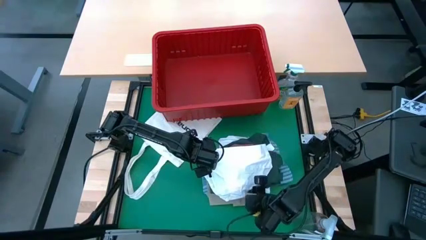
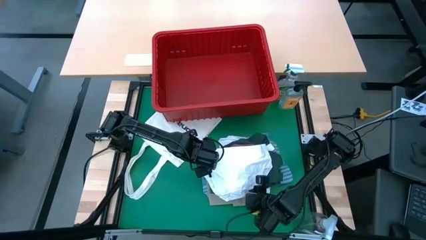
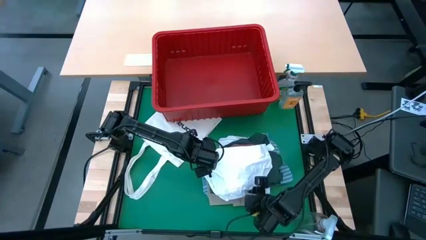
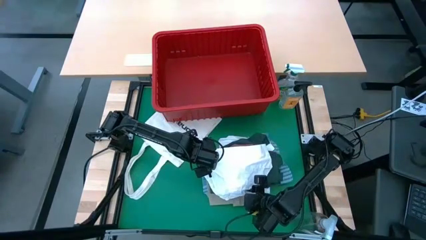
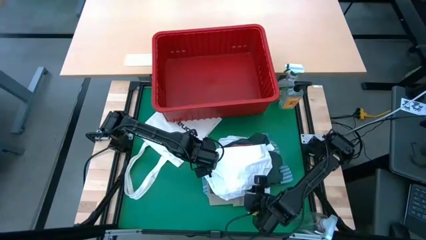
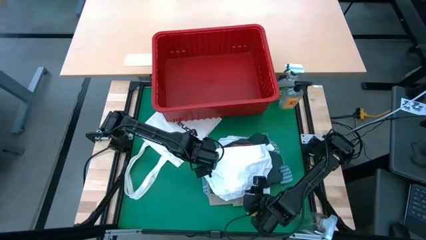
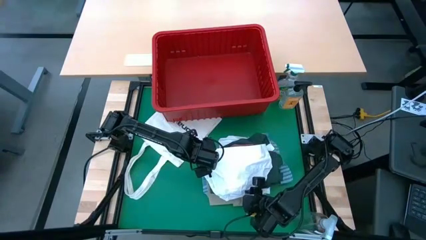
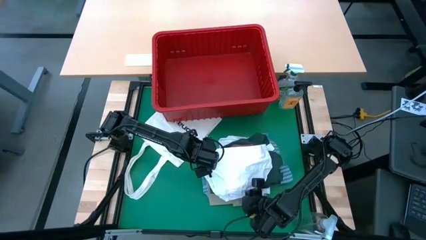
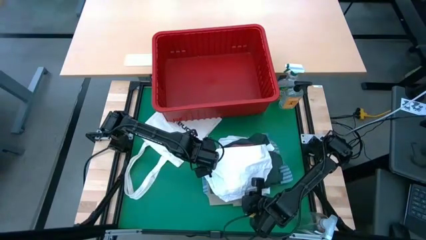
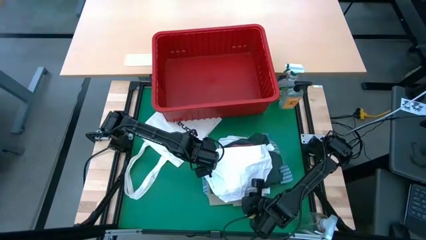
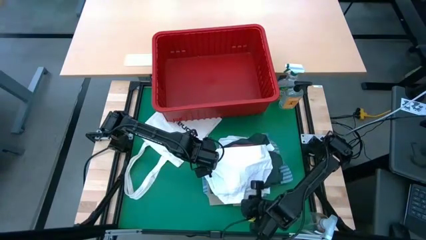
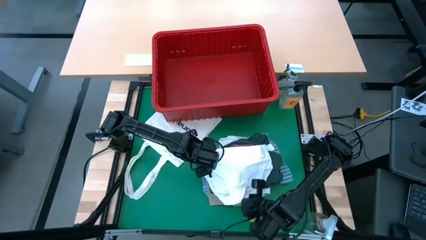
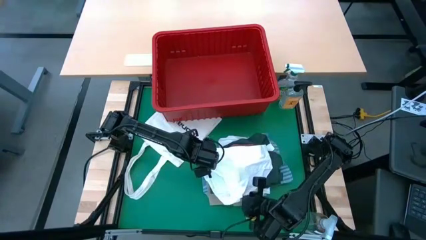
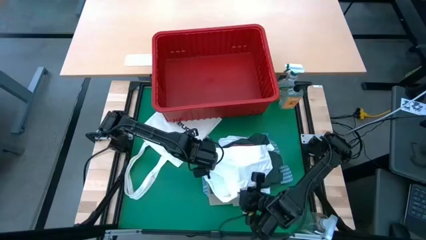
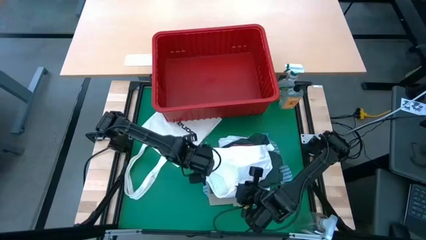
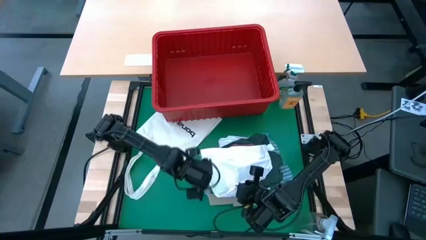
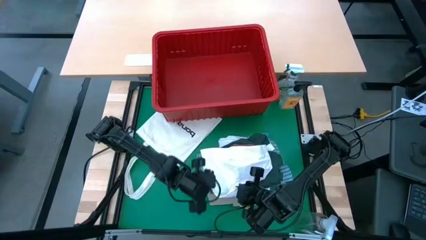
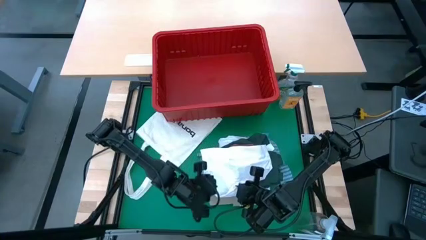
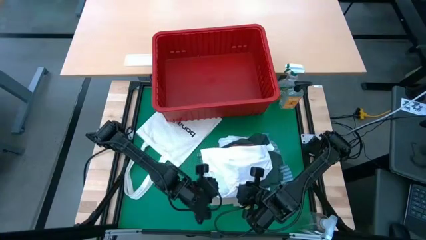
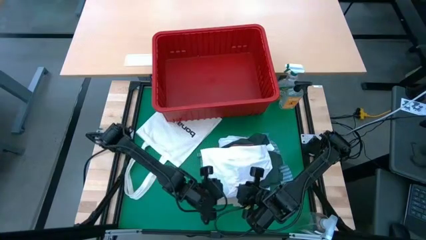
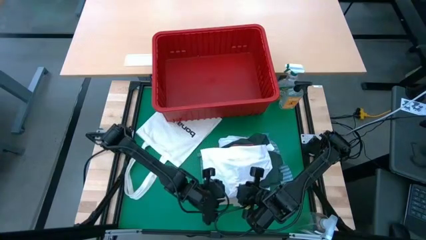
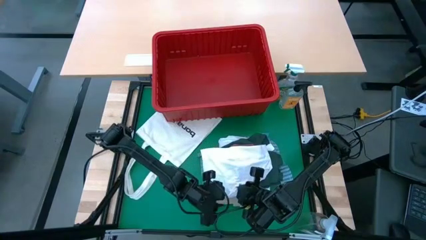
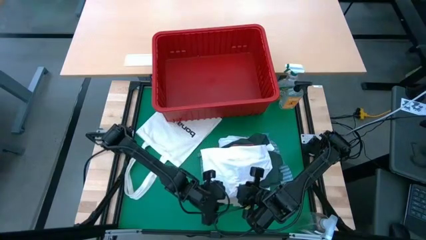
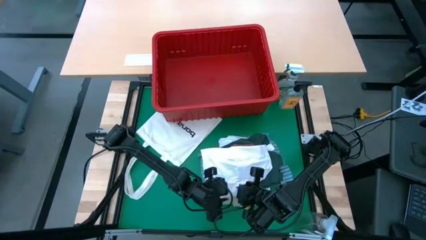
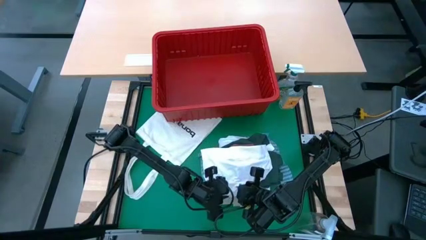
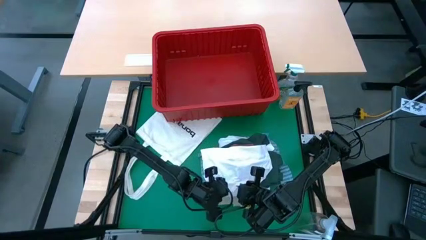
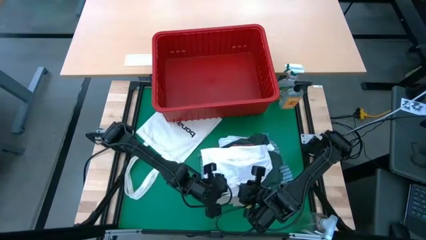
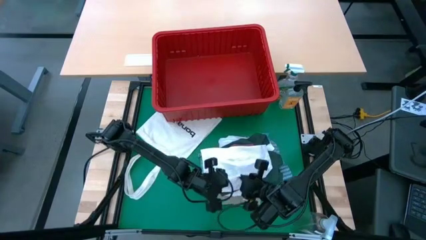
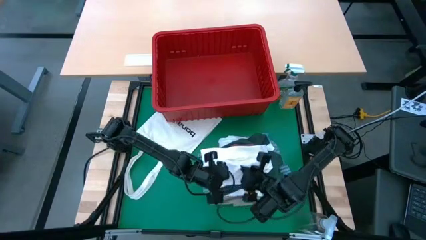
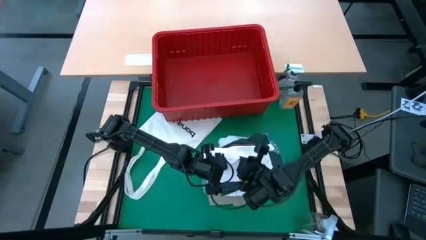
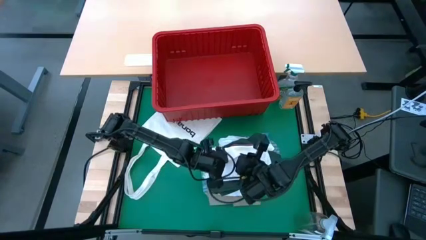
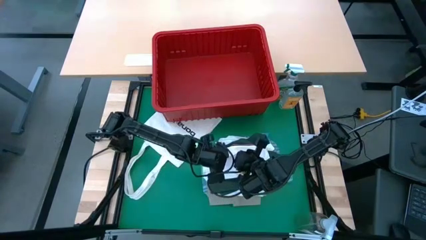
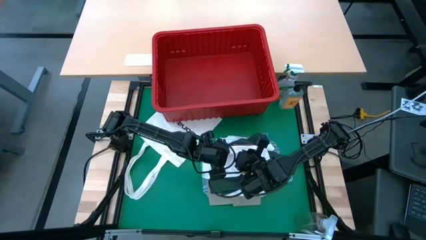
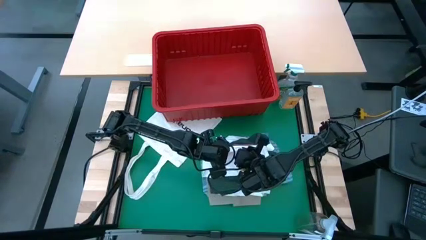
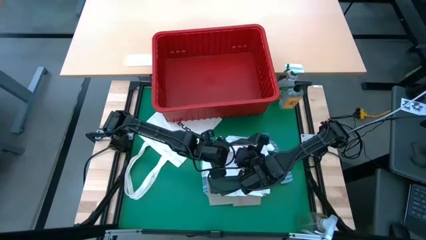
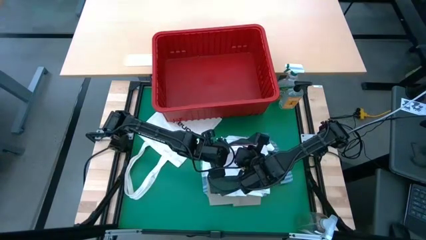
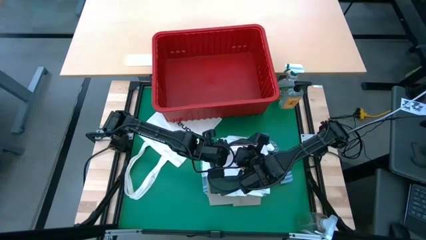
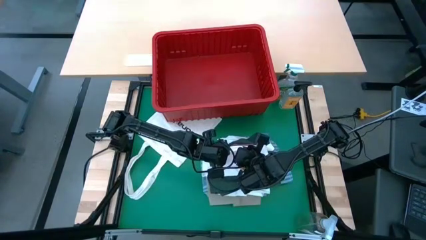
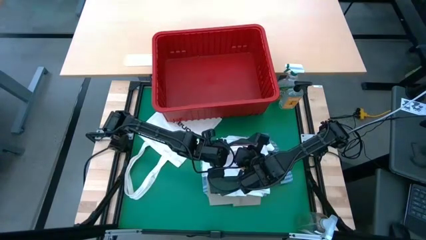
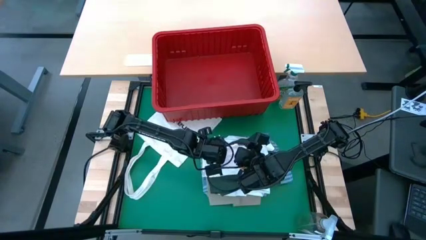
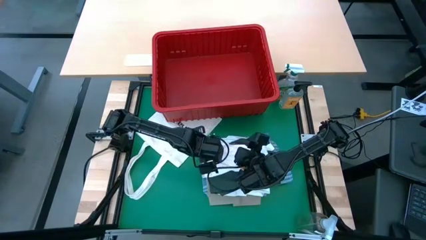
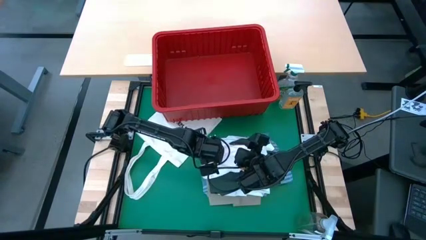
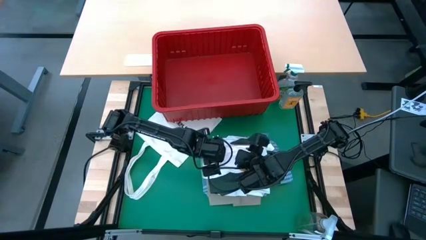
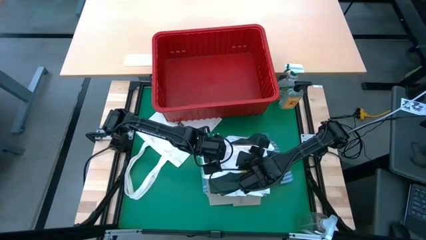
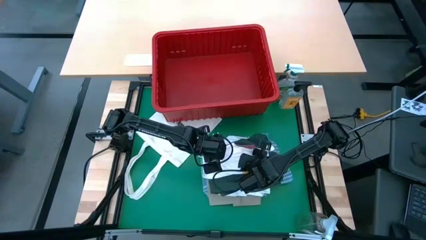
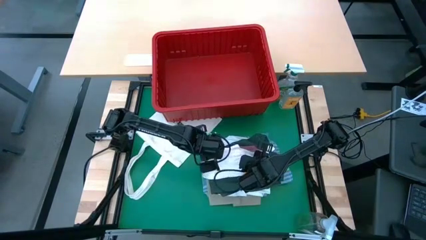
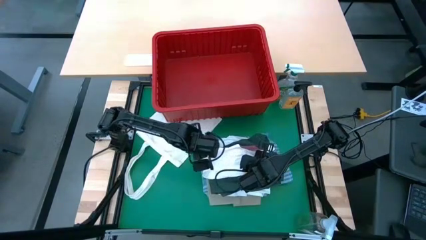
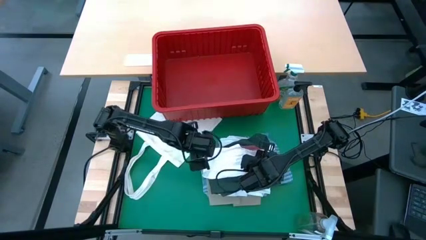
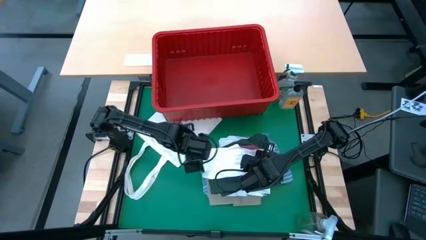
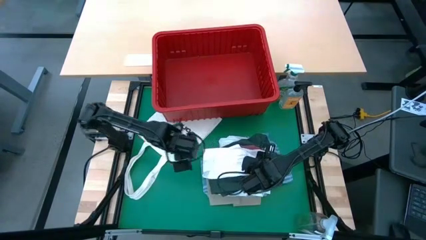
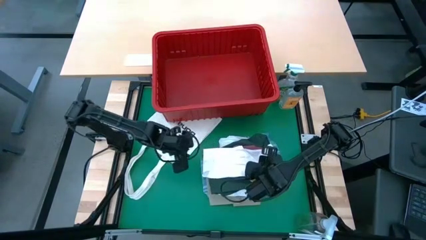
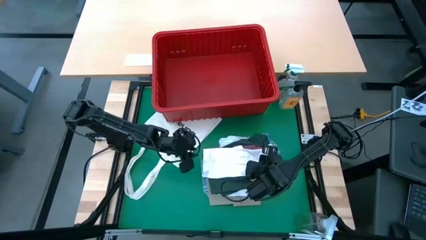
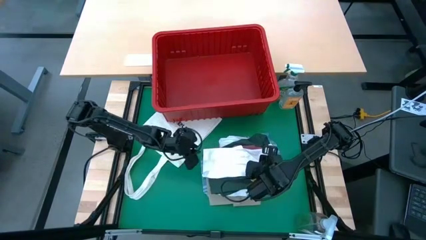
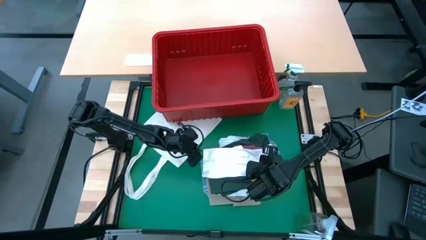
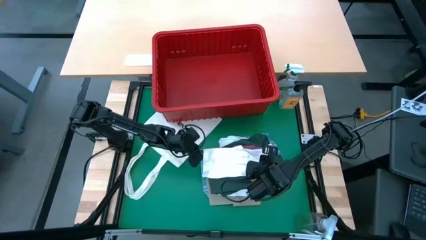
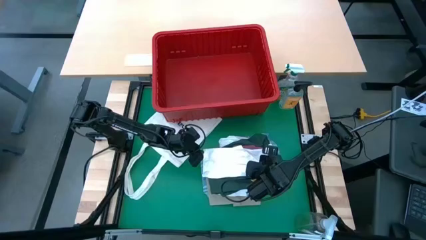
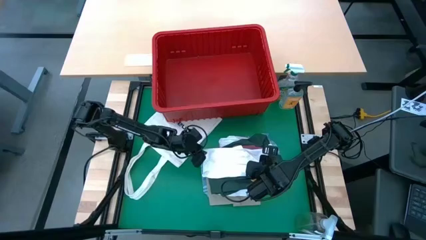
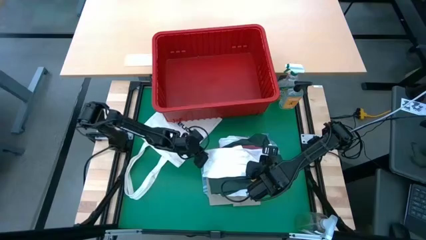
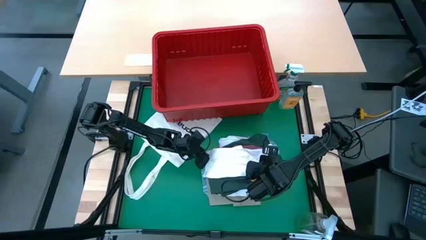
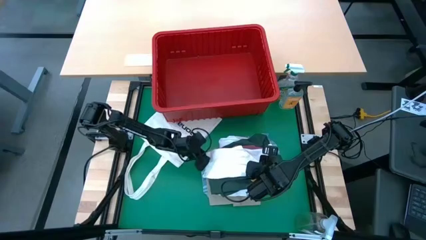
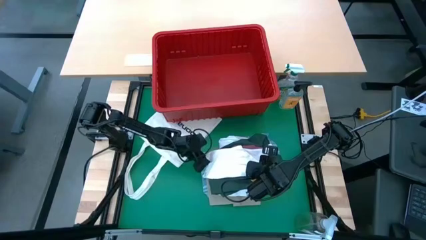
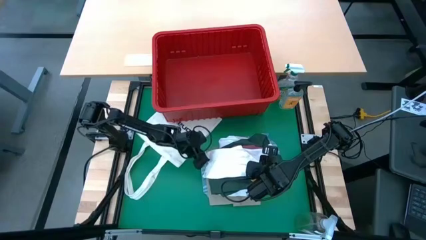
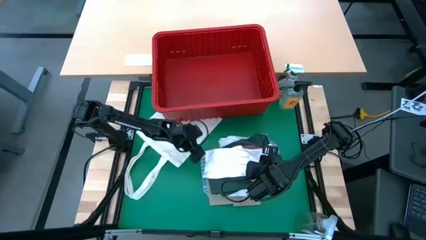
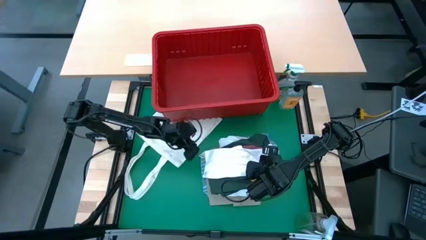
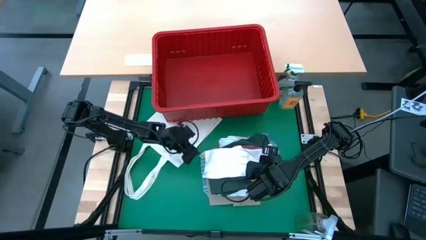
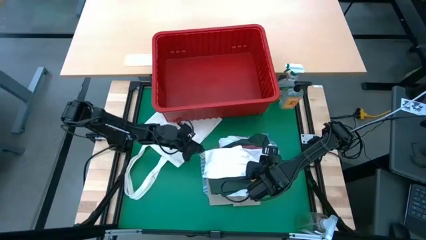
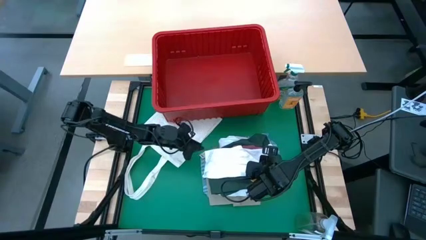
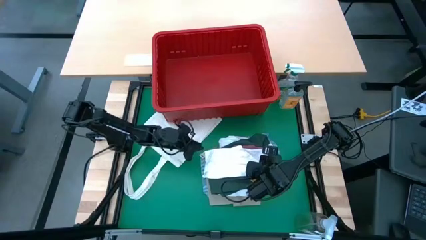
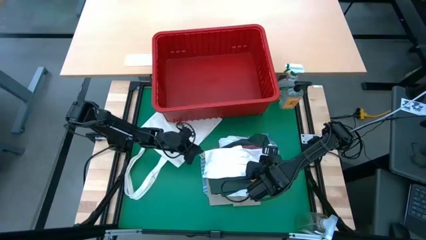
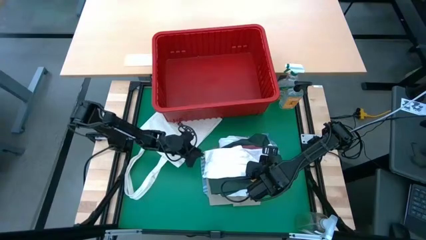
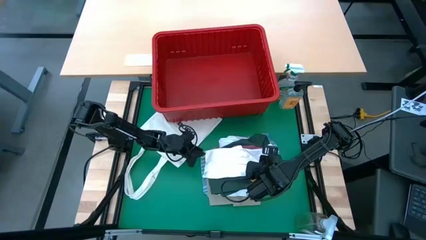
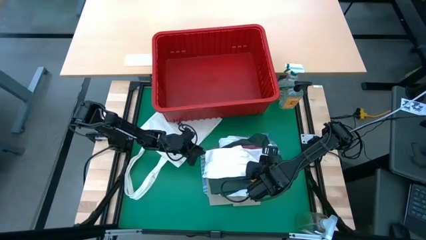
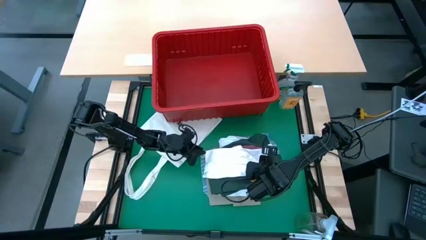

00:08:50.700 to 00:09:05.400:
Task: Fold Laundry from Bin
Fold the white underwear
